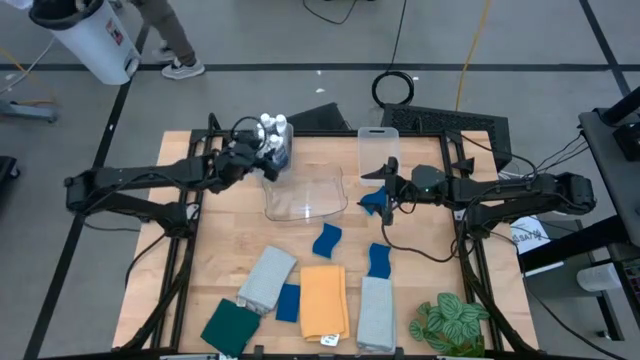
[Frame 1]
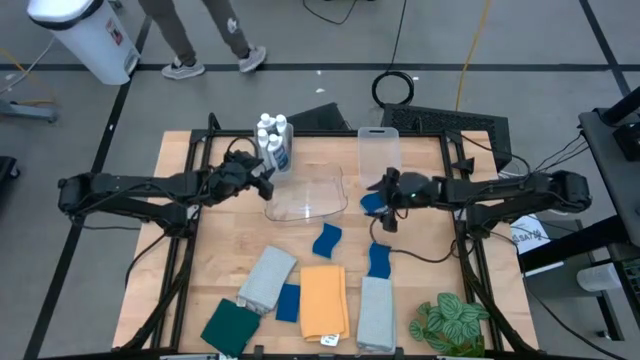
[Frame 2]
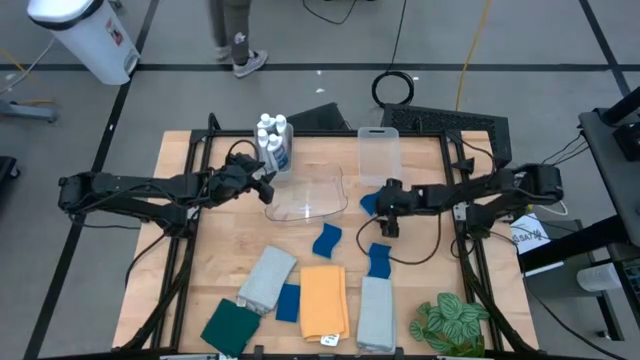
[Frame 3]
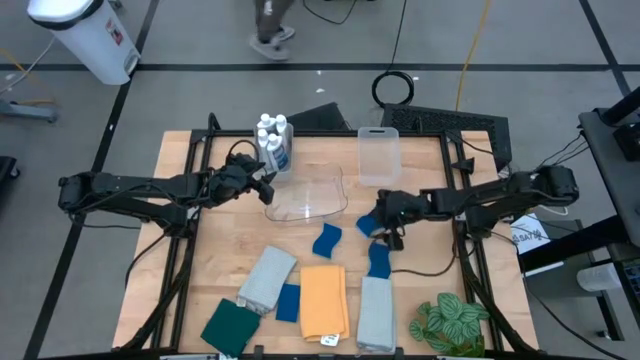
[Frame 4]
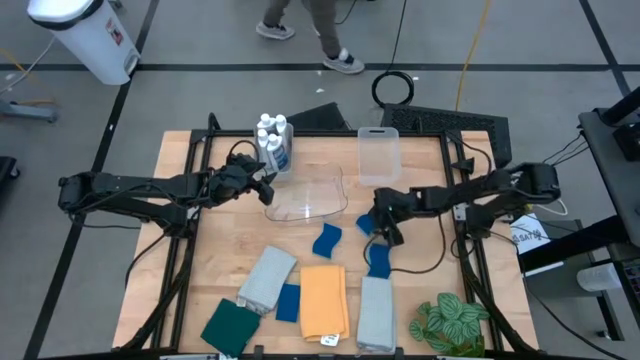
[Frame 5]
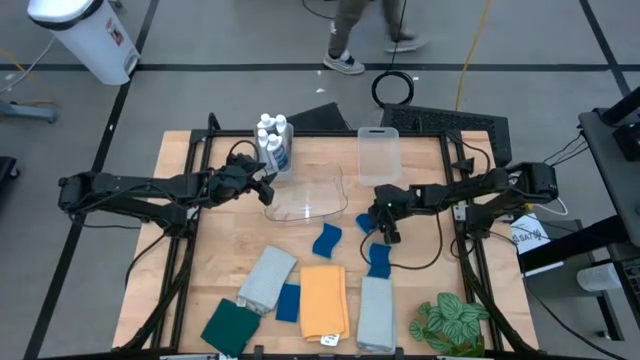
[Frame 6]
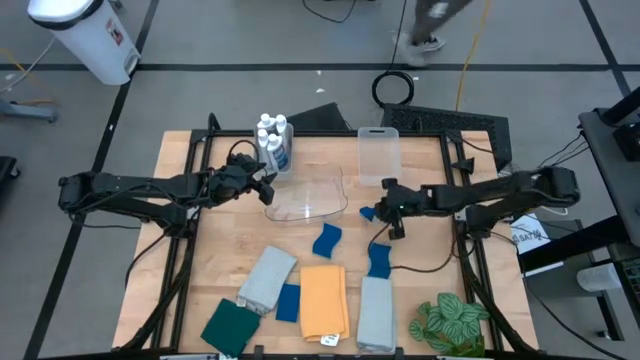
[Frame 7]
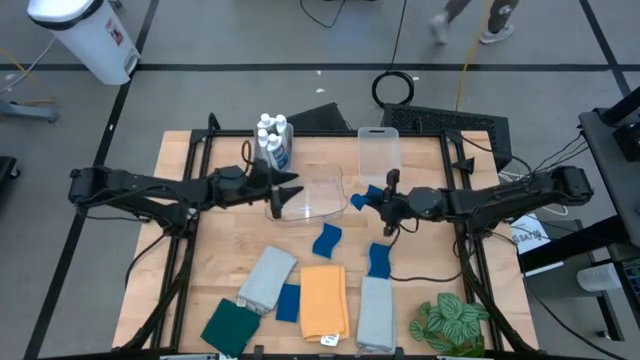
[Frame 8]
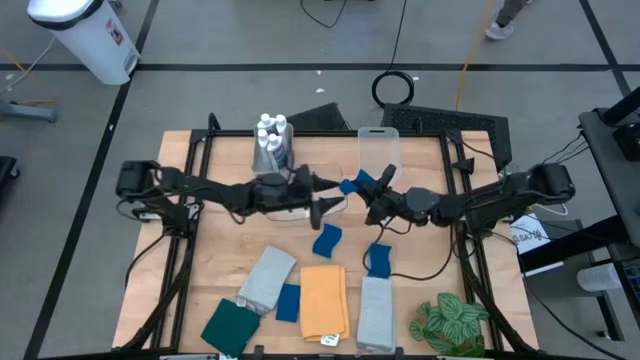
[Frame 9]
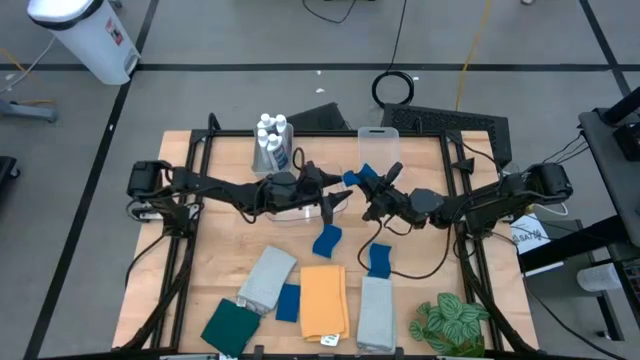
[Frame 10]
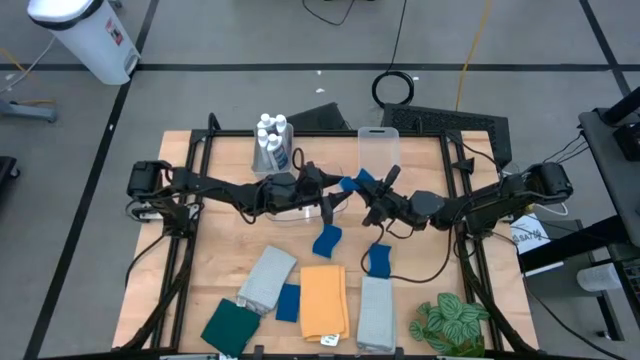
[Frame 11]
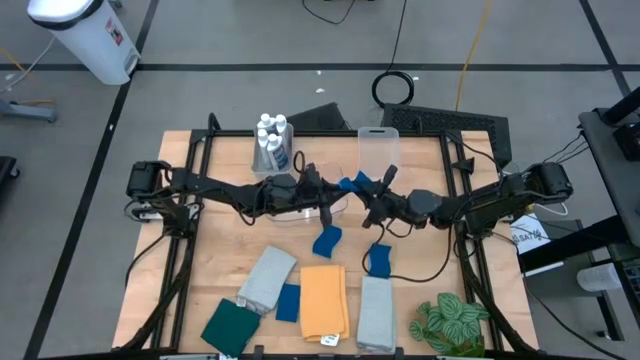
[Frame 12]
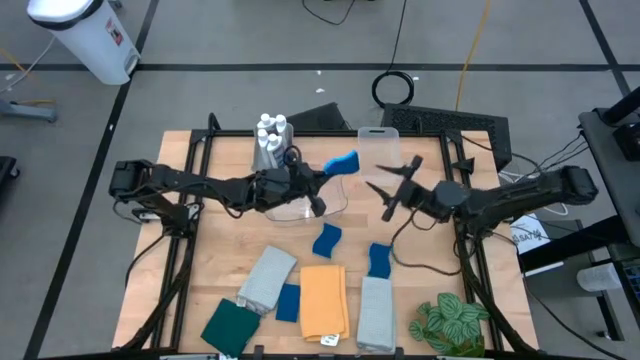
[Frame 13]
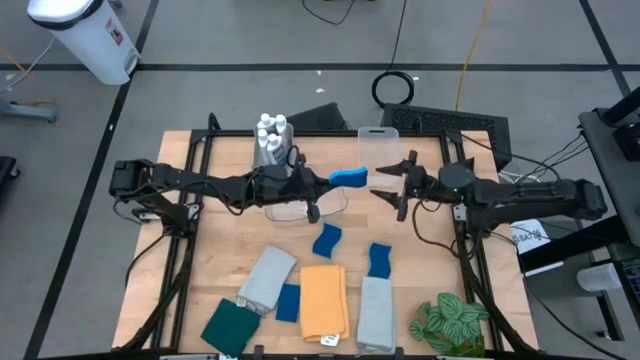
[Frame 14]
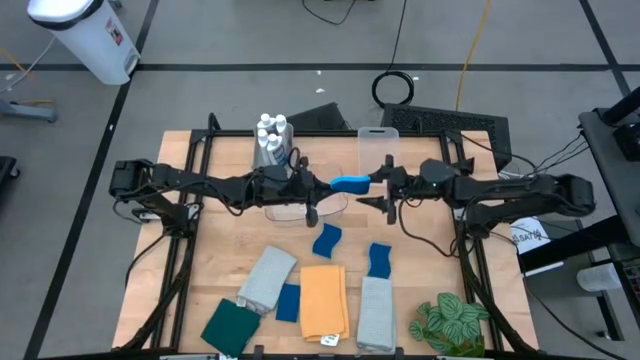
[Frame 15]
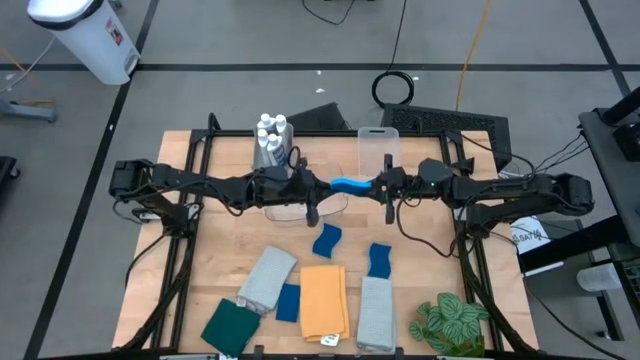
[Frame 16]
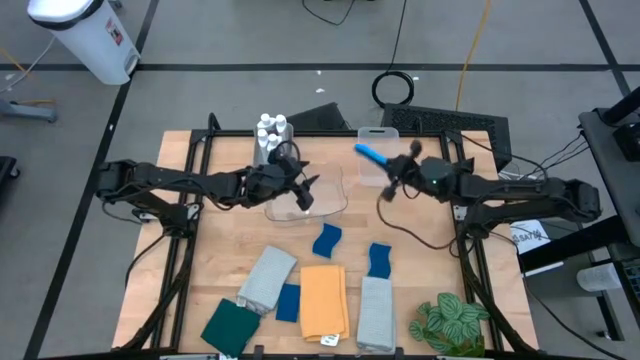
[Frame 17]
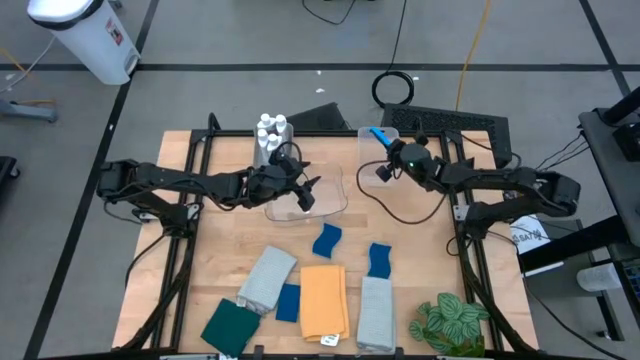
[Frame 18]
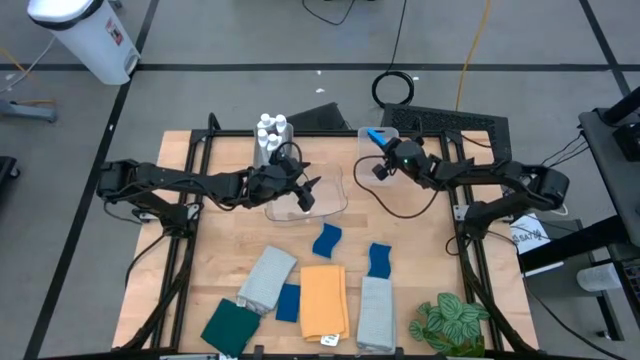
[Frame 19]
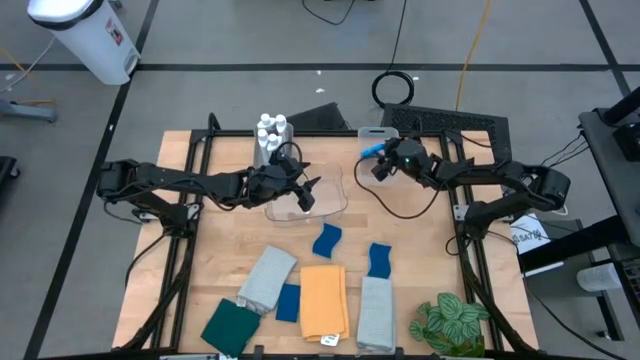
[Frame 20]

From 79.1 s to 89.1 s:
Task: Pick & Place Kitchen Items
Put the blue sponge into the white bin

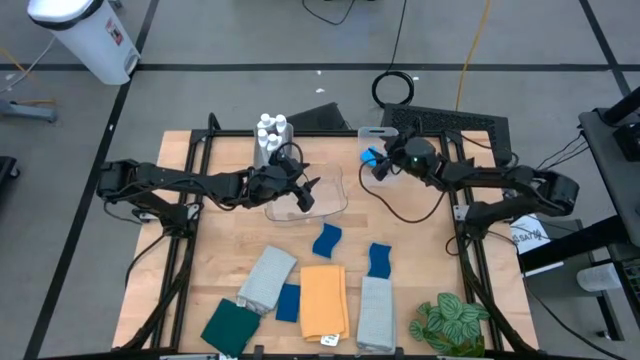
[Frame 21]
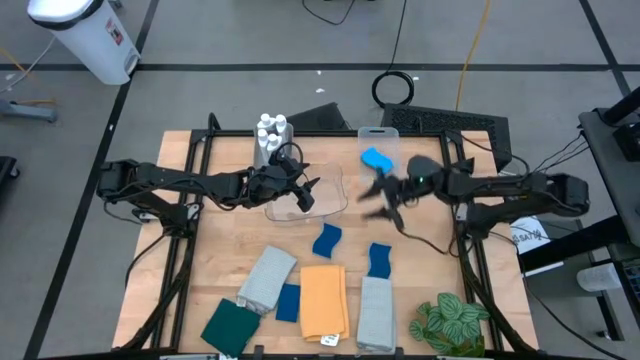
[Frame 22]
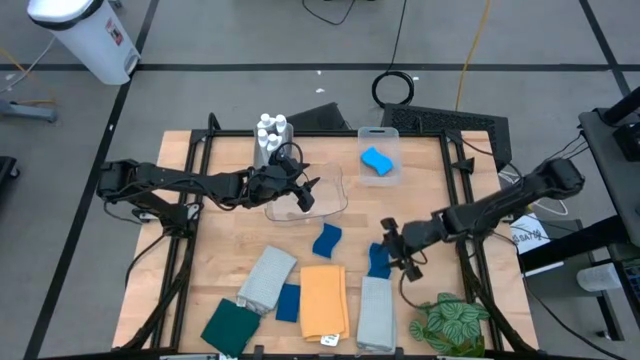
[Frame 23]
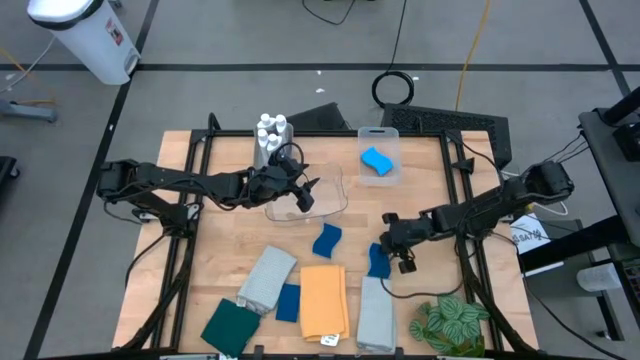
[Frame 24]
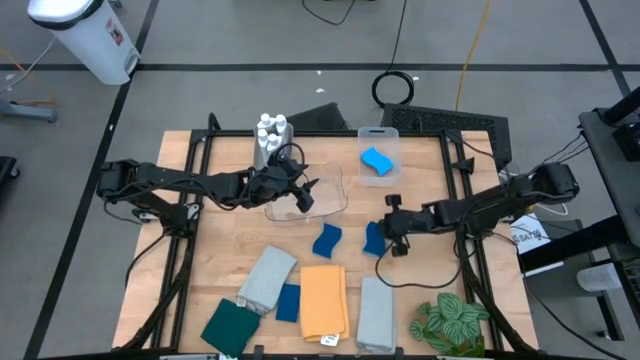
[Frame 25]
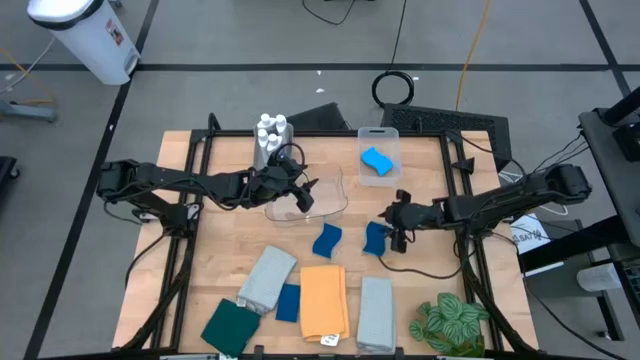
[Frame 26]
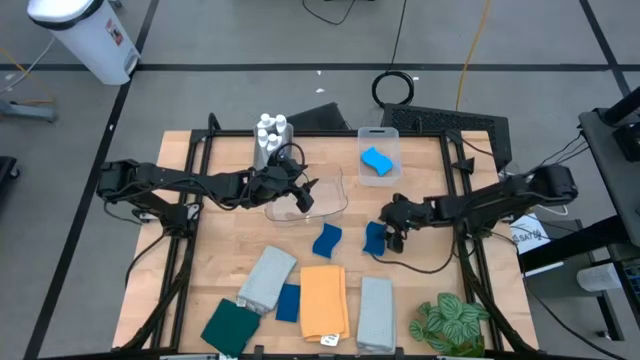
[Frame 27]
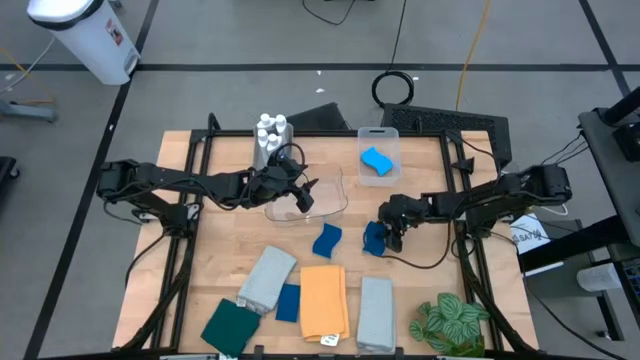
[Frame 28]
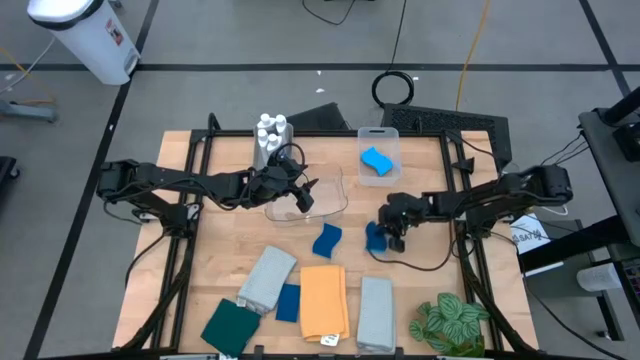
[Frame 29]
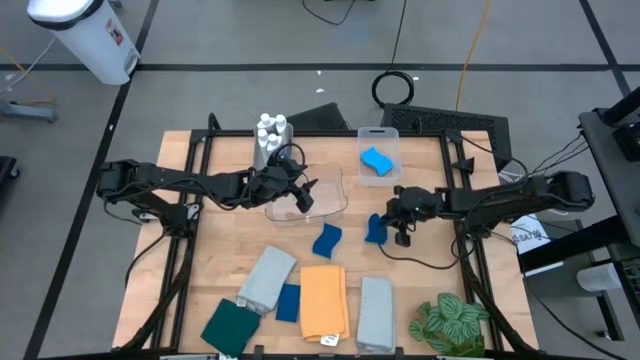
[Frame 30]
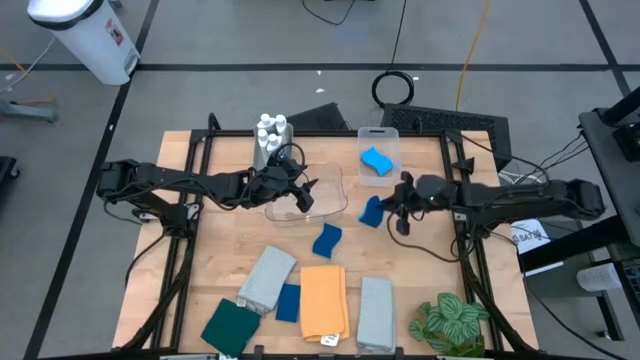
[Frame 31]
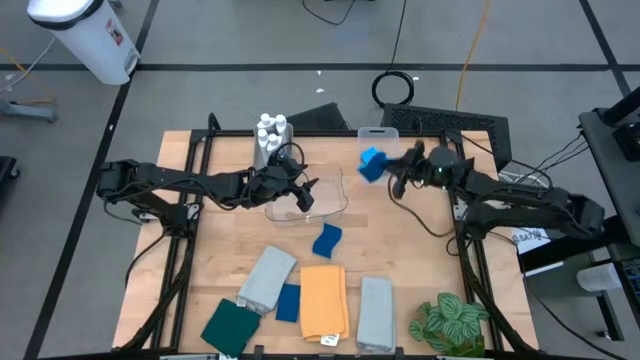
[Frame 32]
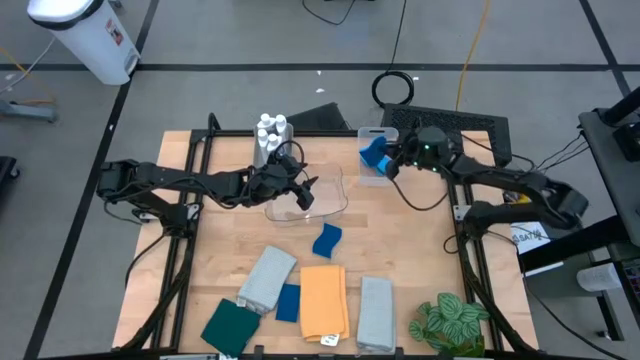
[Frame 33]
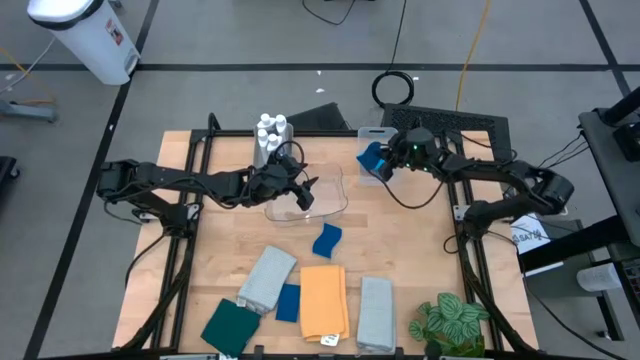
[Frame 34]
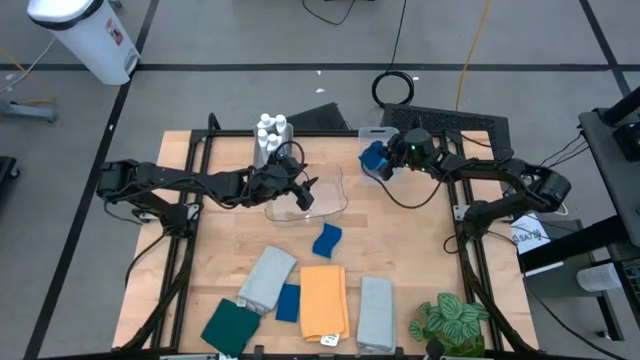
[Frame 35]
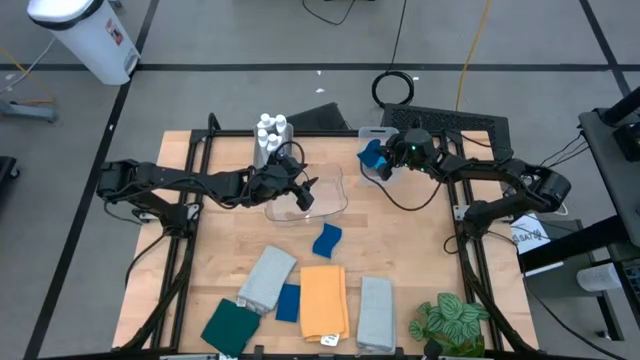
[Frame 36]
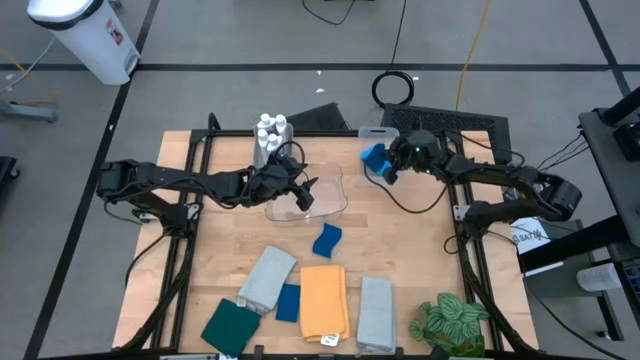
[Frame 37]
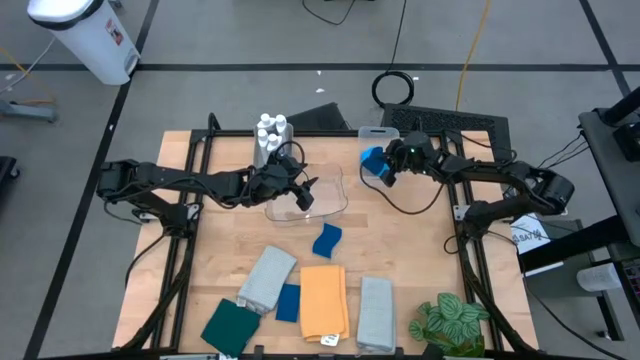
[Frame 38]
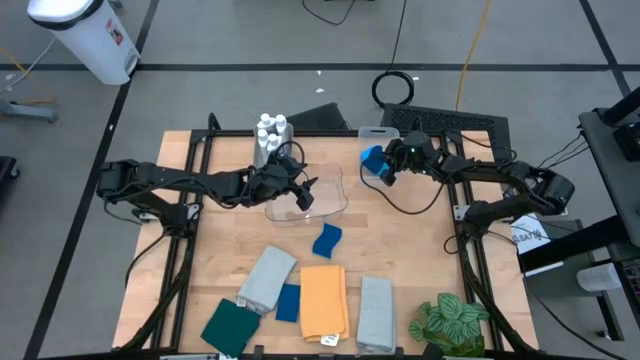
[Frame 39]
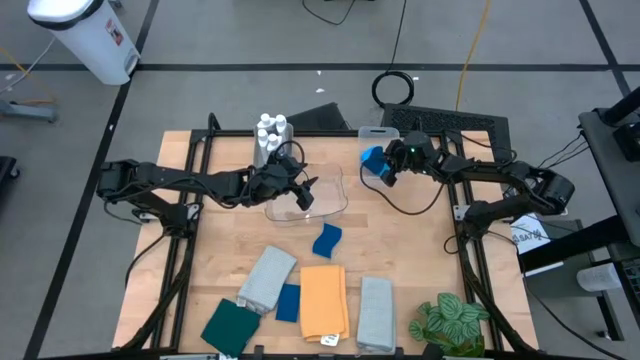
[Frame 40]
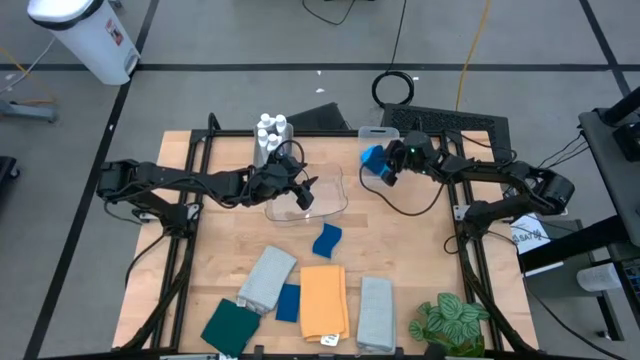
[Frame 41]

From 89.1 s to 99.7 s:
Put the blue sponge into the white bin

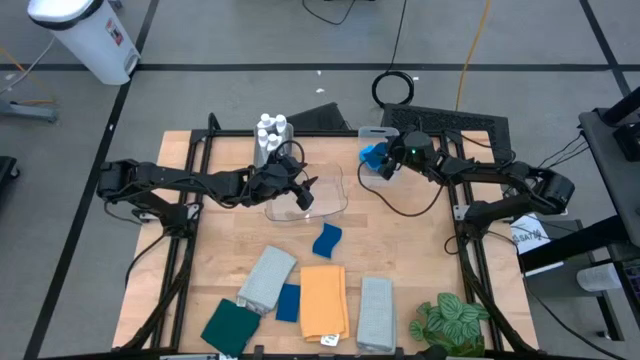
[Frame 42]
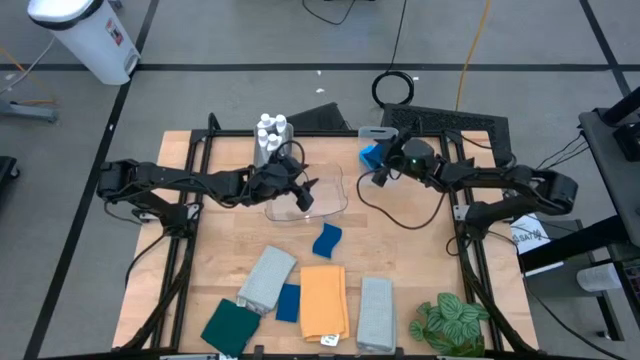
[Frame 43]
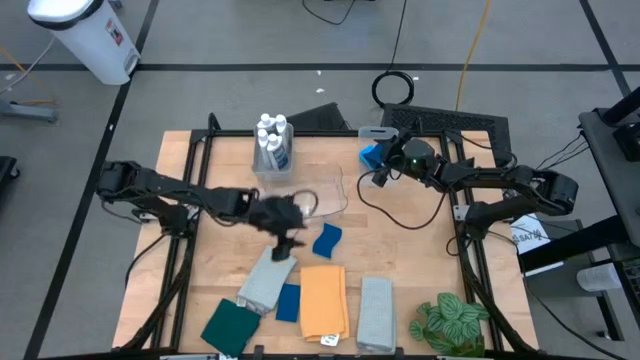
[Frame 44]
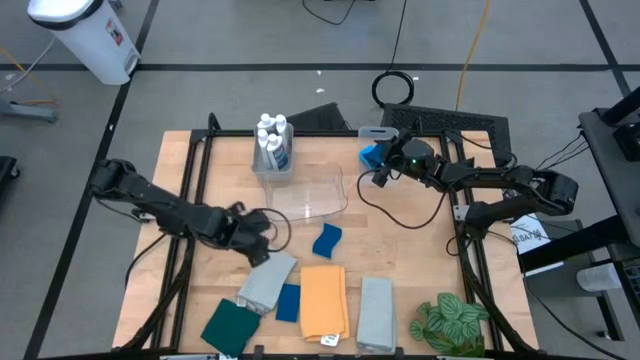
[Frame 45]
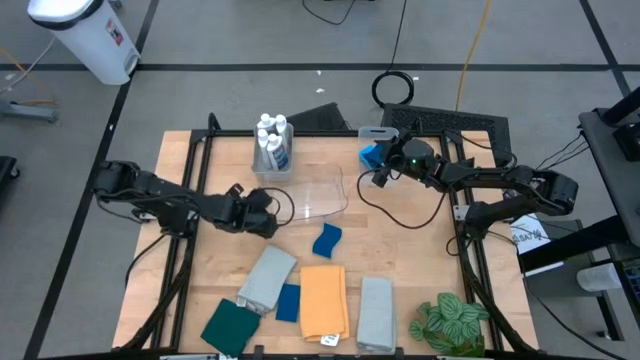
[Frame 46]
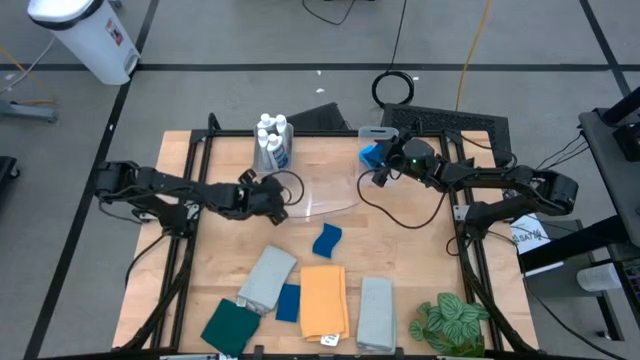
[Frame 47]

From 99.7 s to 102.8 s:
Adjust the transparent bin
